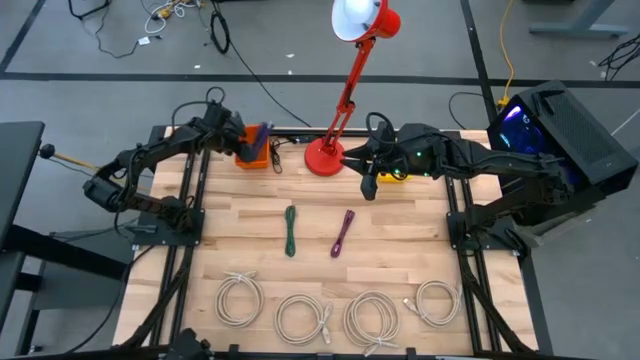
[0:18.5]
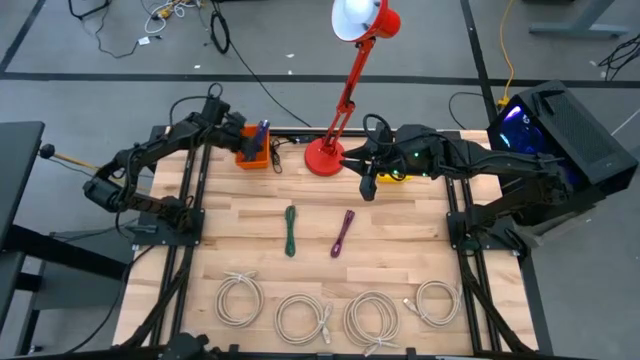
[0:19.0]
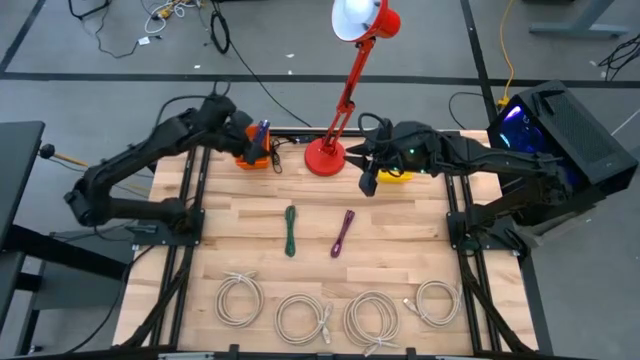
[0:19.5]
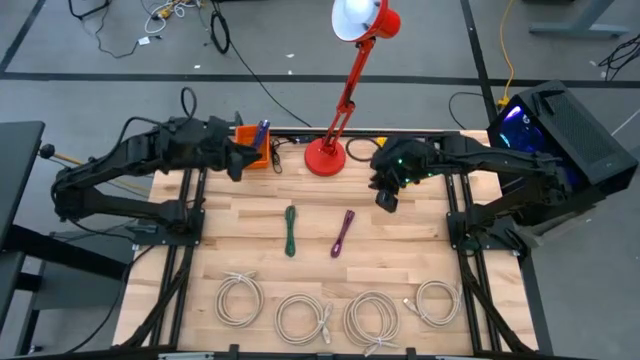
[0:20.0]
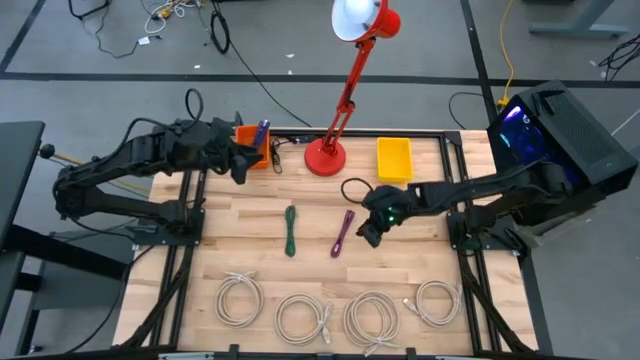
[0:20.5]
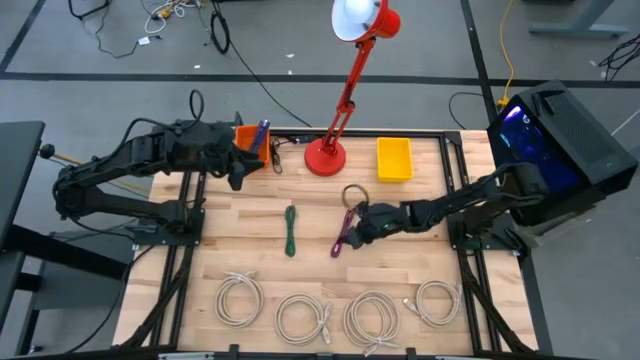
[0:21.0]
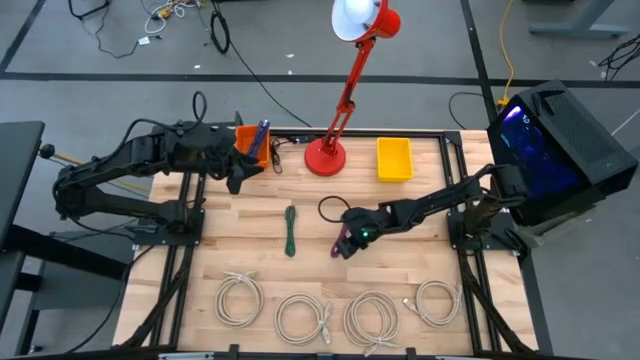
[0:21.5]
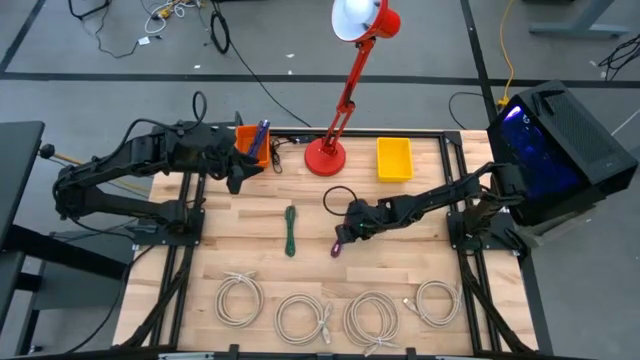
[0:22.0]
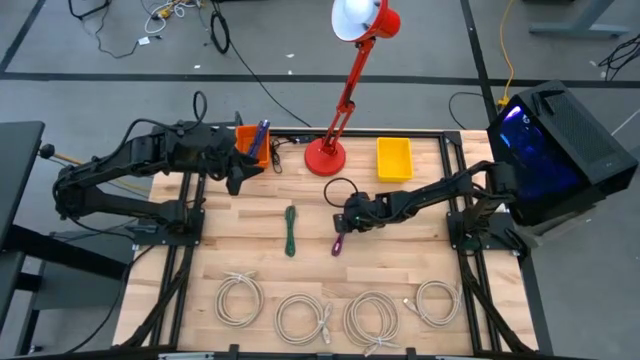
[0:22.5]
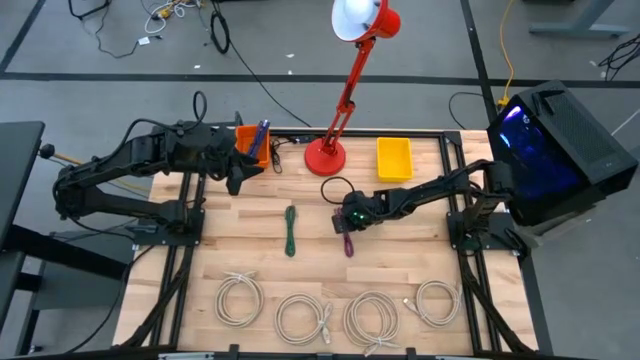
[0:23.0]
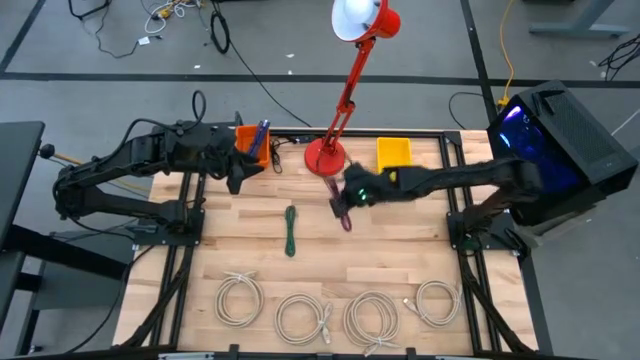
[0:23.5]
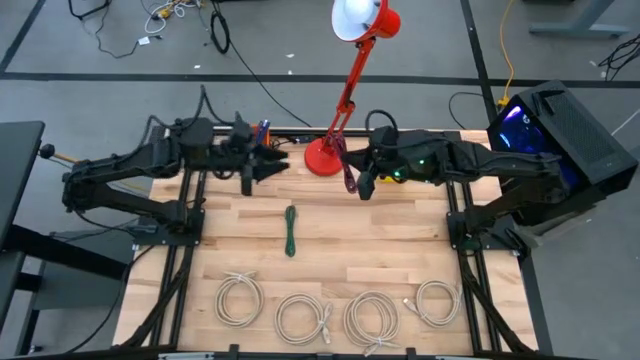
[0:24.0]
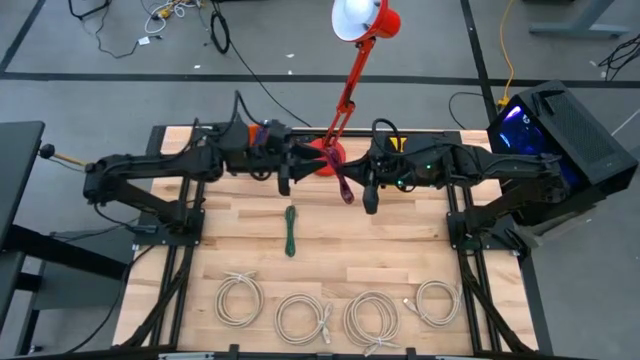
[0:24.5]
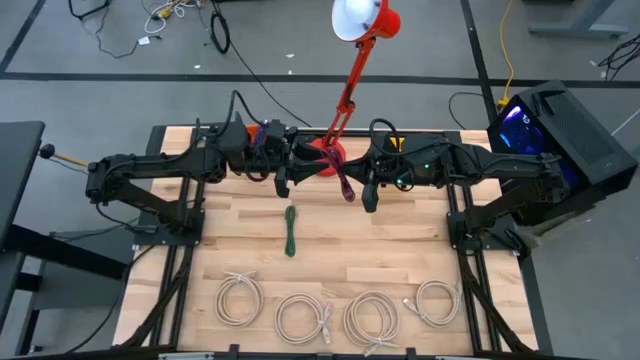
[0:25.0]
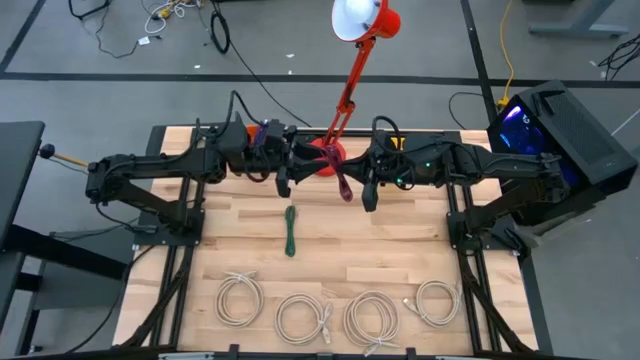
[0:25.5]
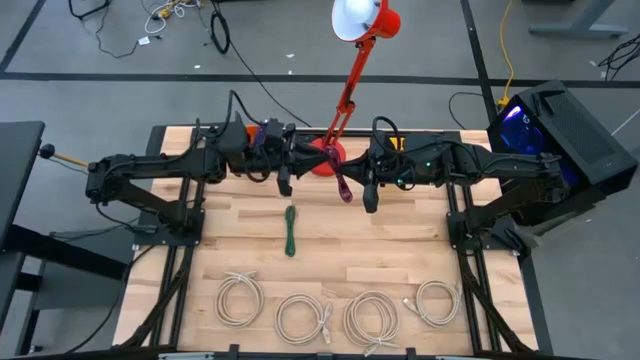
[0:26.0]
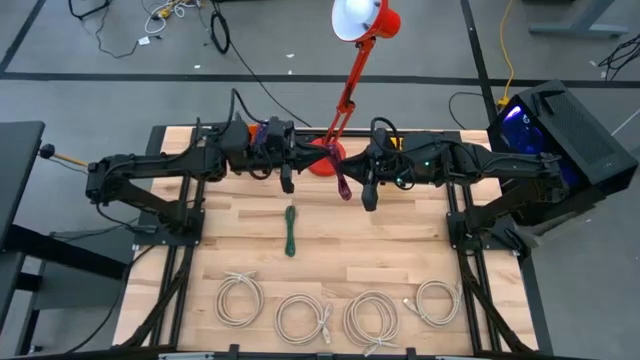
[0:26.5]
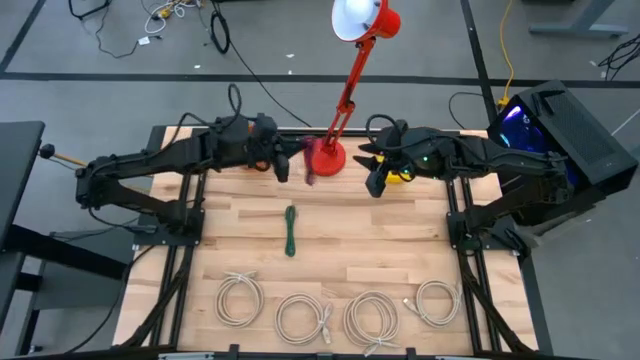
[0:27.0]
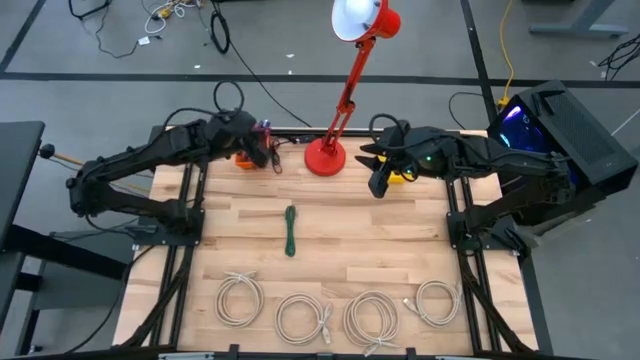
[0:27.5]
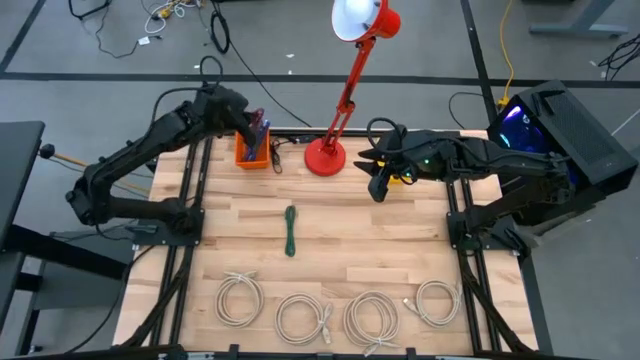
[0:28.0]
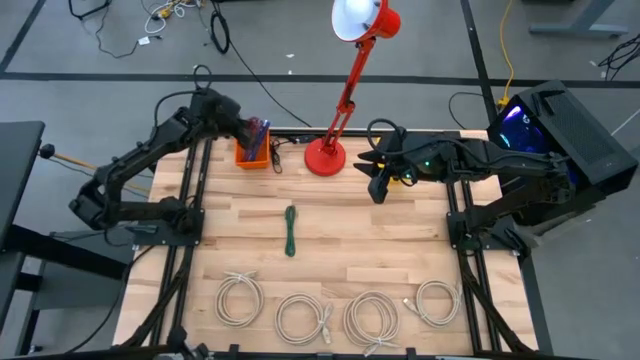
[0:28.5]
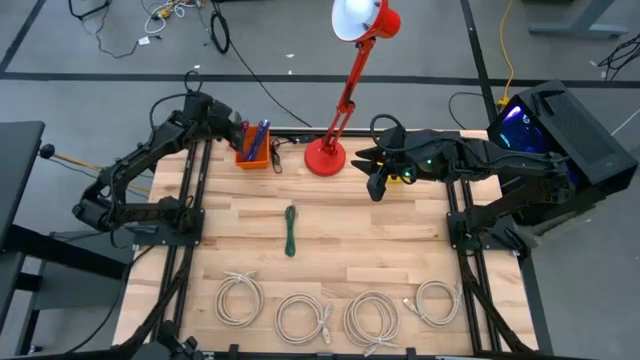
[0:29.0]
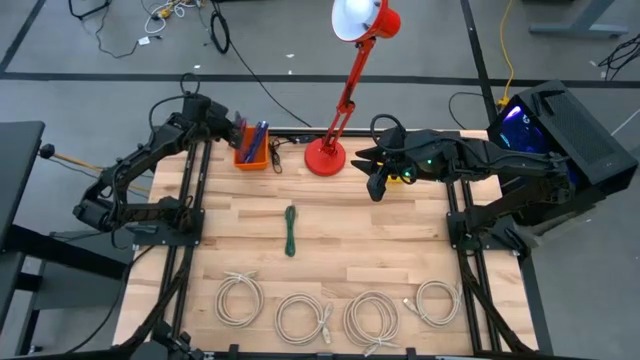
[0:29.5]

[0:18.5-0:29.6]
Task: Pick & Place USB Port
Put the pink and black charger cable into the orange bin

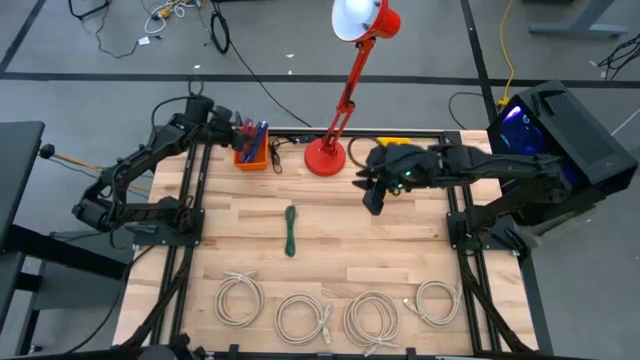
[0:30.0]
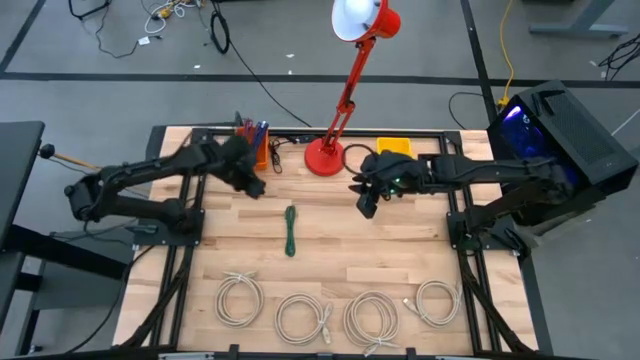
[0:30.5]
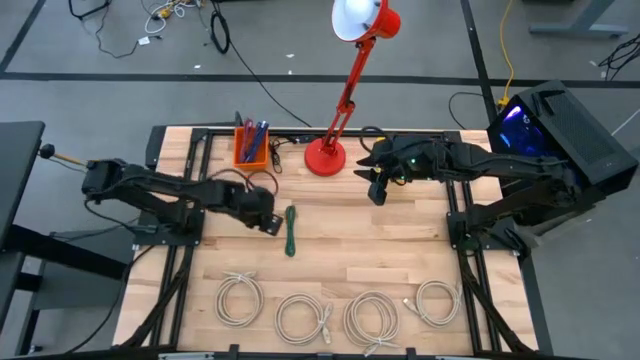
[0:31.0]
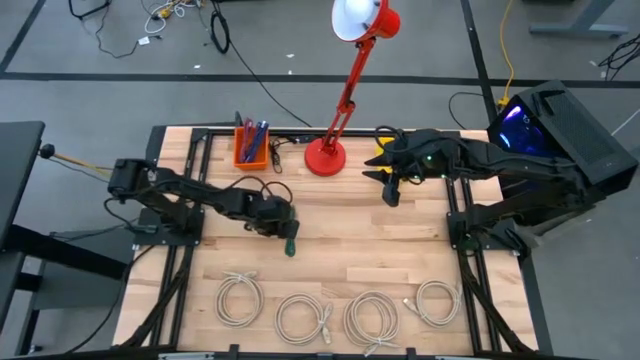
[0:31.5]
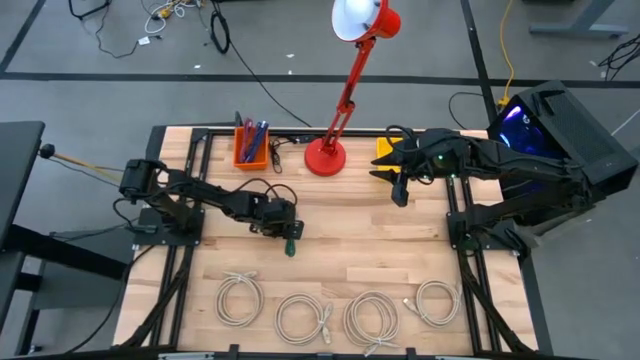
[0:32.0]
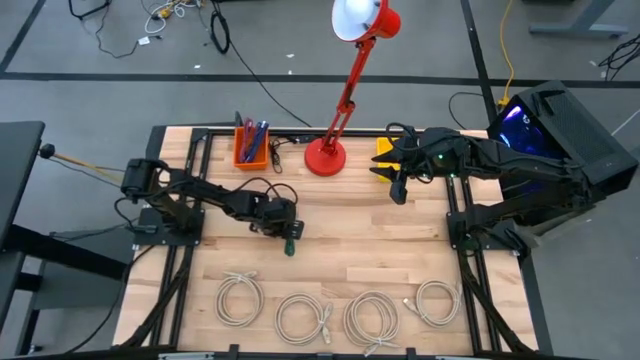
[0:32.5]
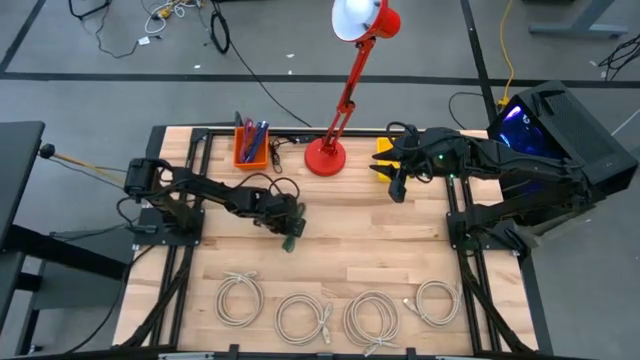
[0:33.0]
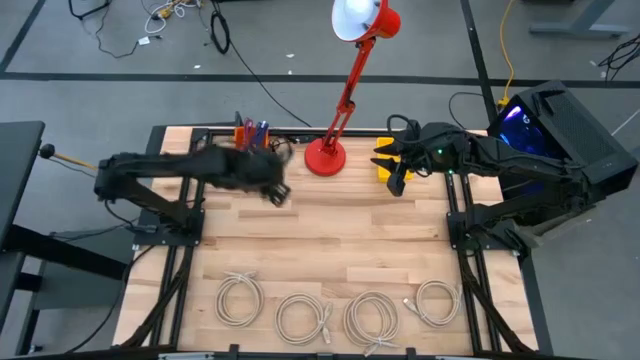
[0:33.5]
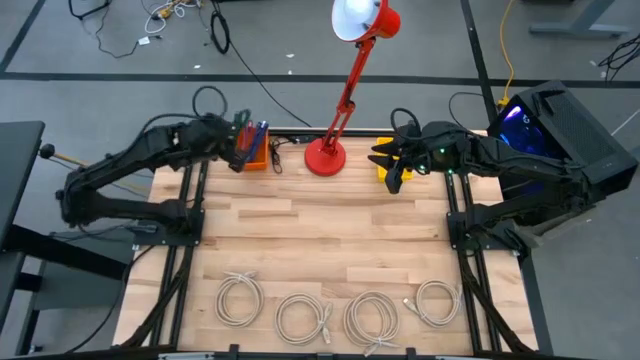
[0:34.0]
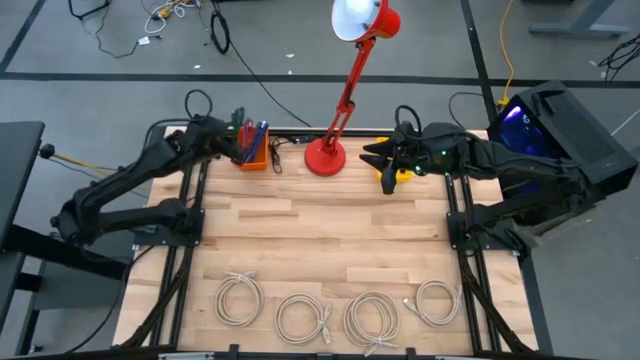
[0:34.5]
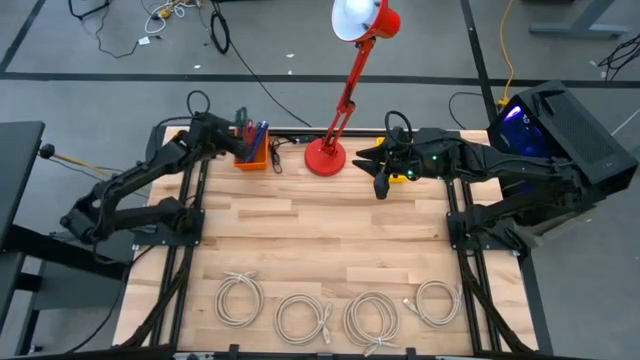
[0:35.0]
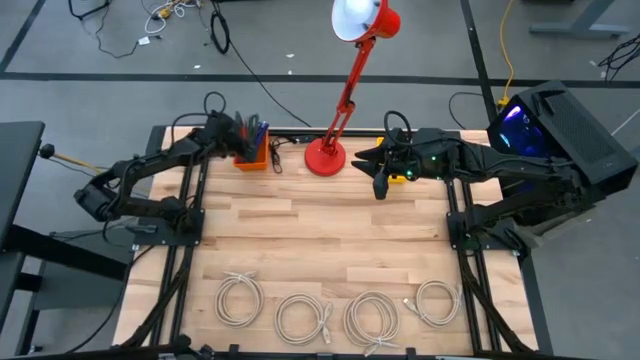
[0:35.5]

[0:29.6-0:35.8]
Put the green and black charger cable into the orange bin

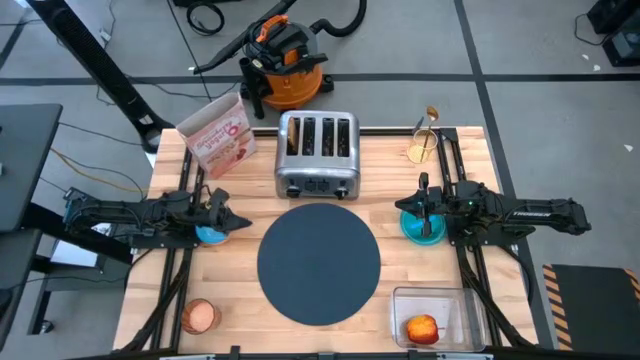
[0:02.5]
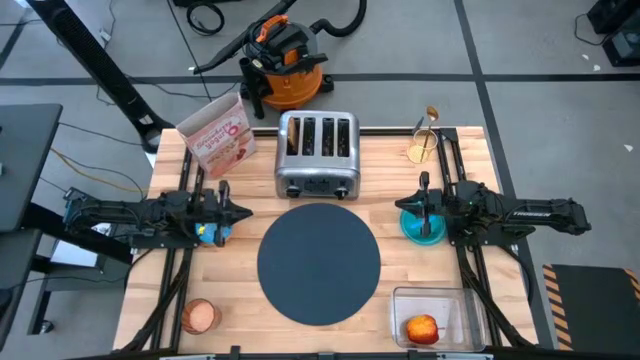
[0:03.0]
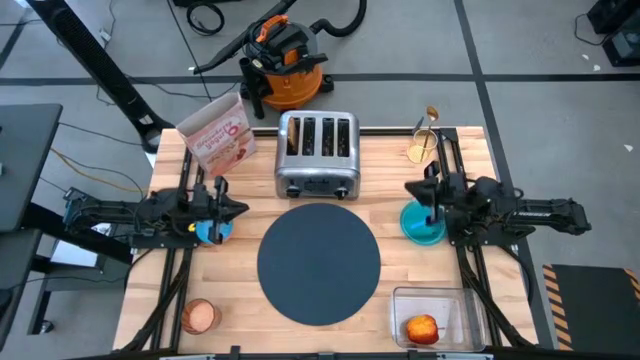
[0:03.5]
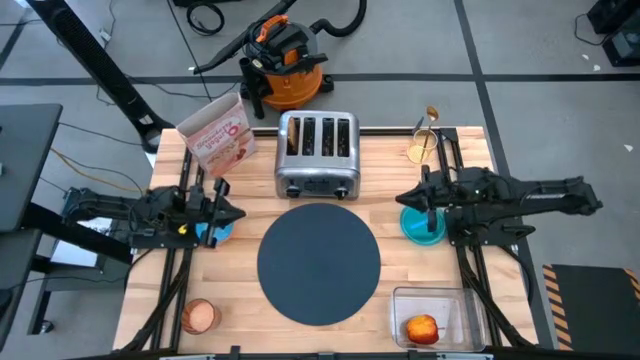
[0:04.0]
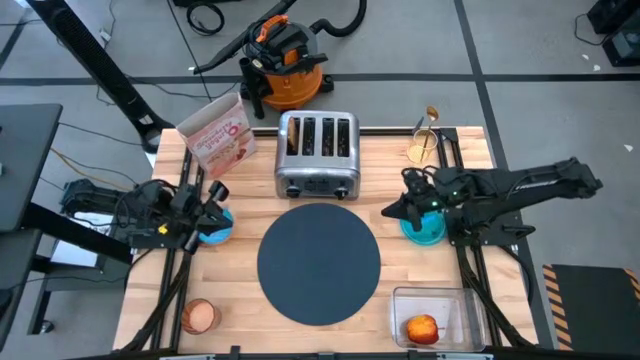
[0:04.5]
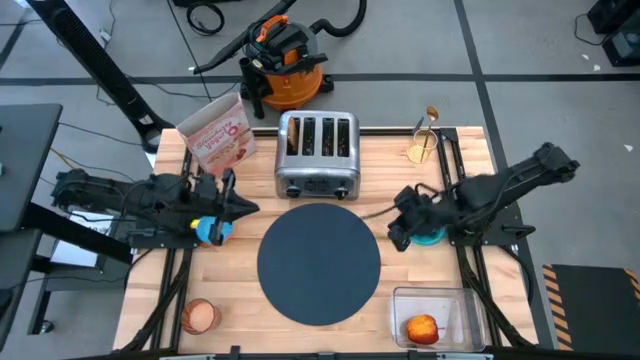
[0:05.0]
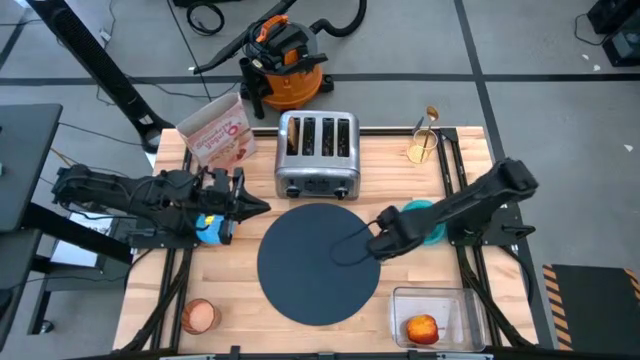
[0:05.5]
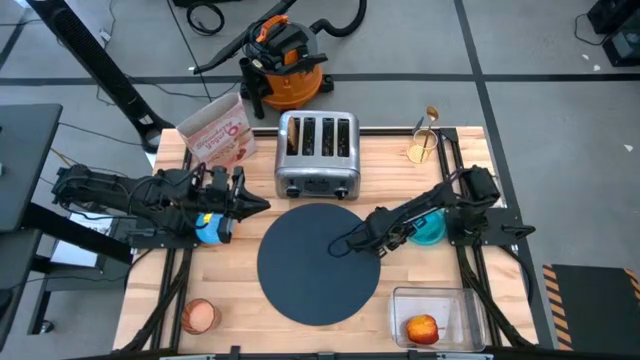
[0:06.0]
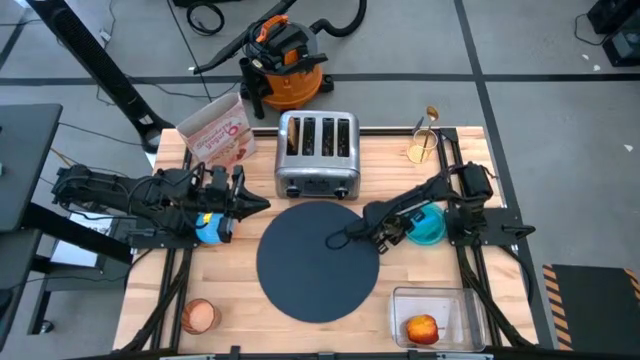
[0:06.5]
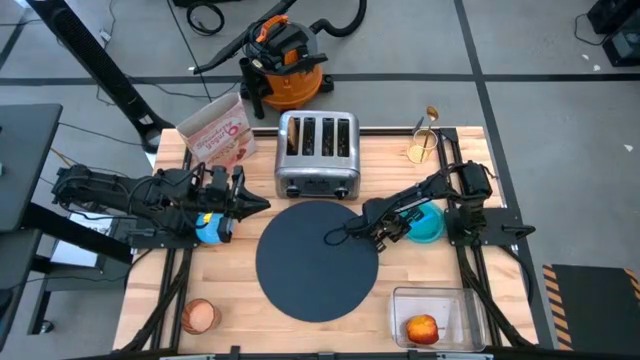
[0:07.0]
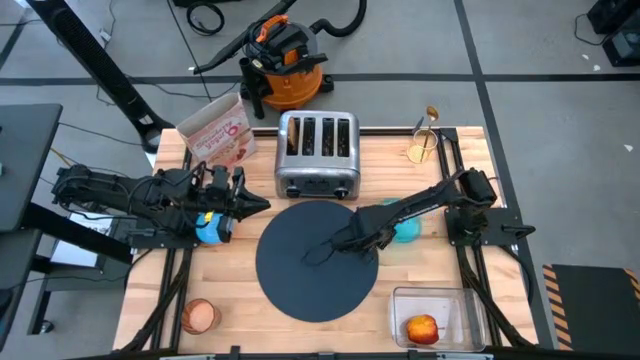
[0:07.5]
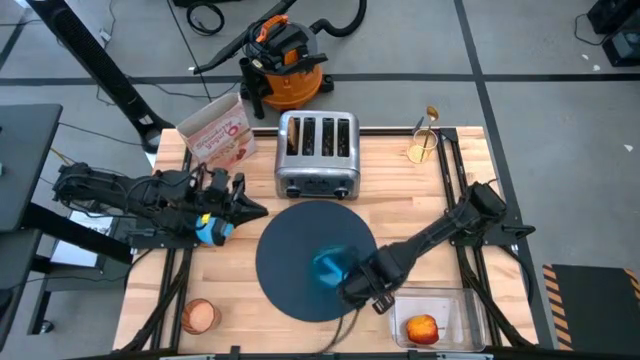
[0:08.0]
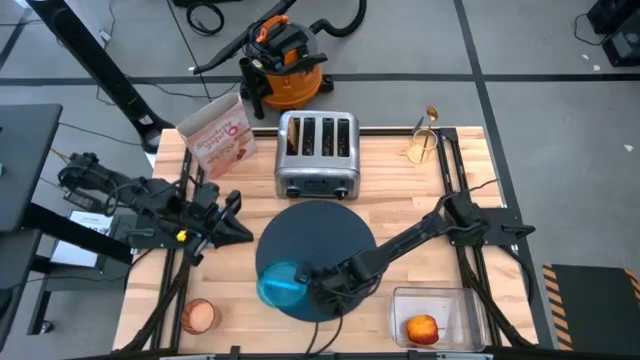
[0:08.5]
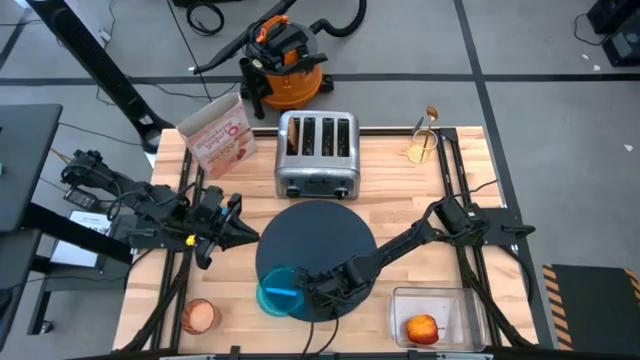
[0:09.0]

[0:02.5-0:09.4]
Task: Arrange a breakfast setting
Put the blue plate on the bottom left of the blue tablemat
